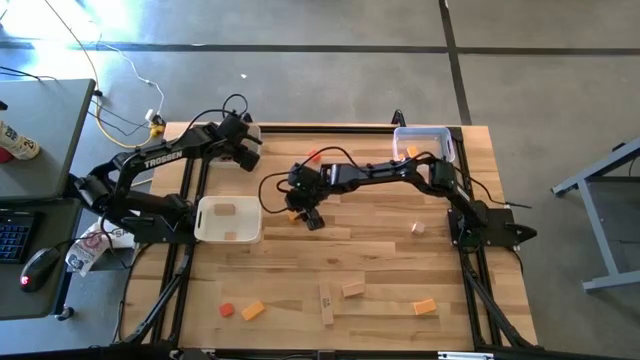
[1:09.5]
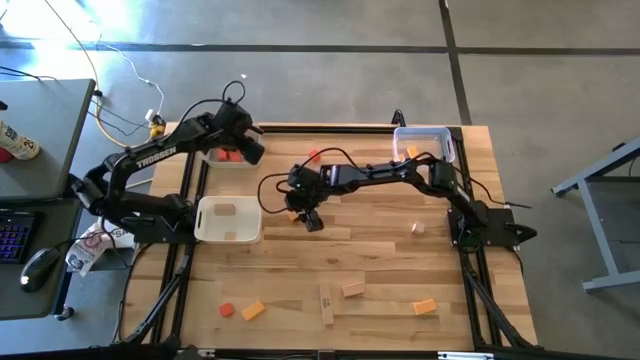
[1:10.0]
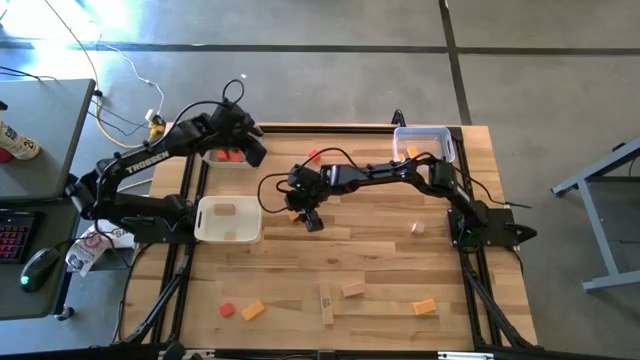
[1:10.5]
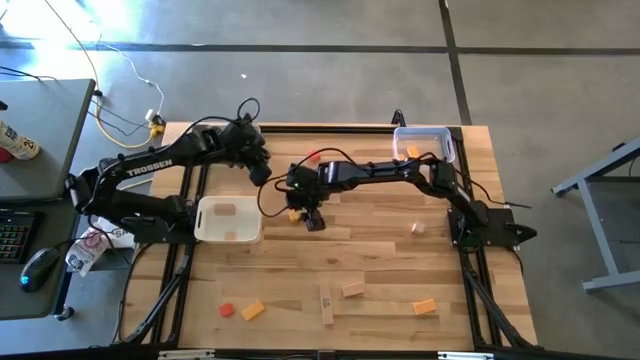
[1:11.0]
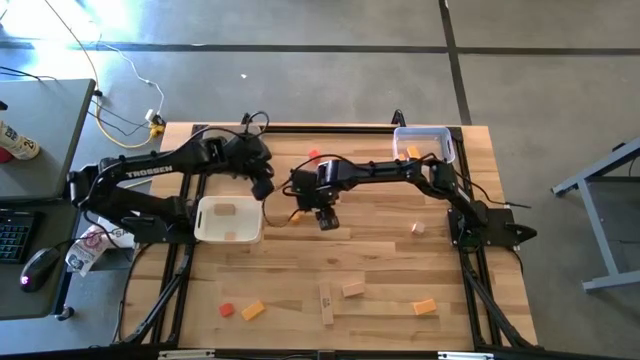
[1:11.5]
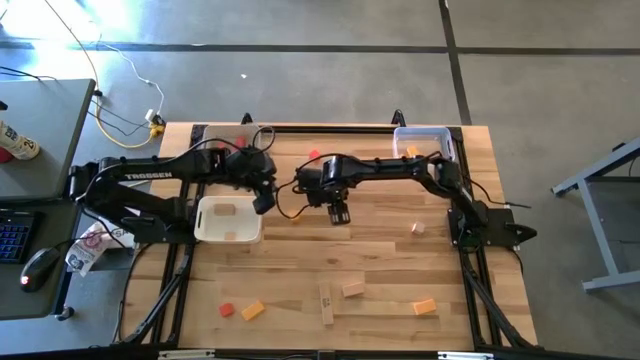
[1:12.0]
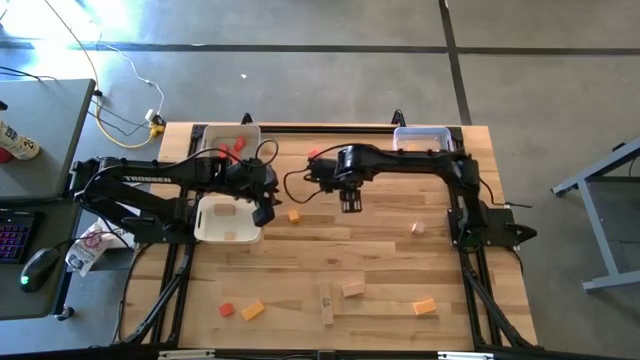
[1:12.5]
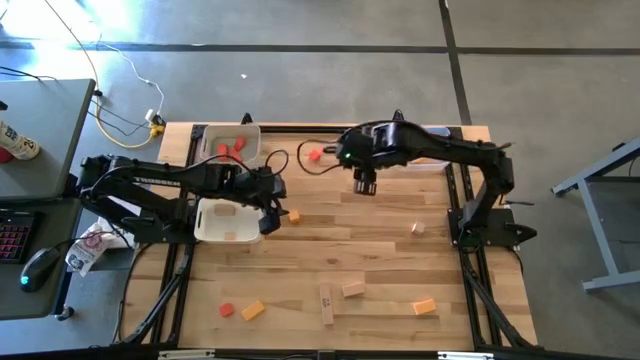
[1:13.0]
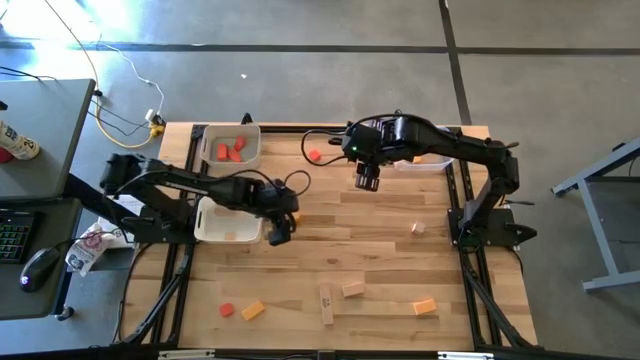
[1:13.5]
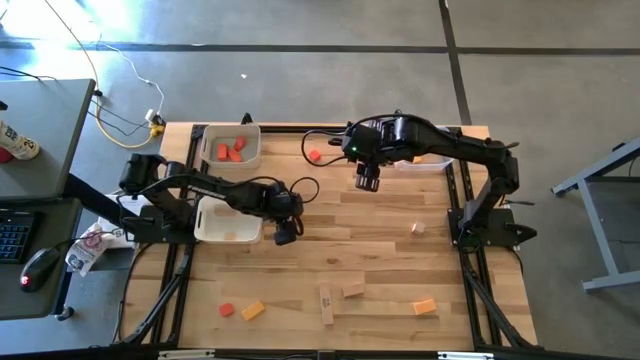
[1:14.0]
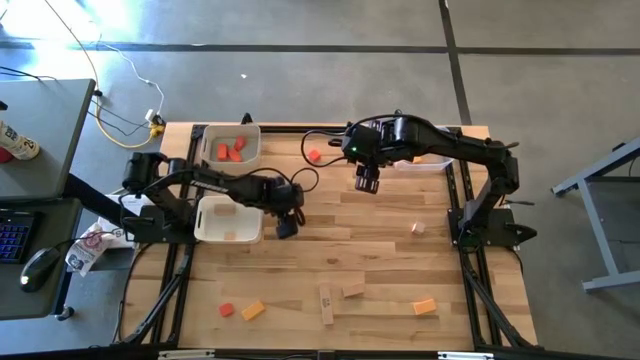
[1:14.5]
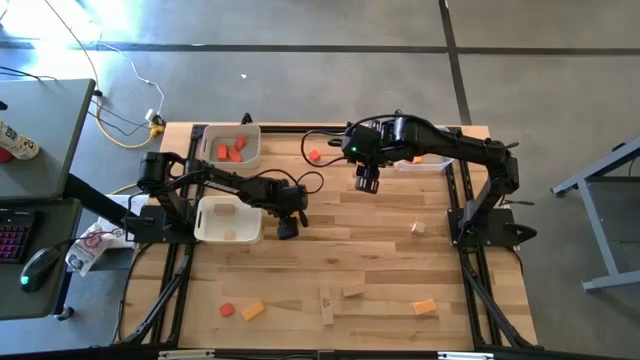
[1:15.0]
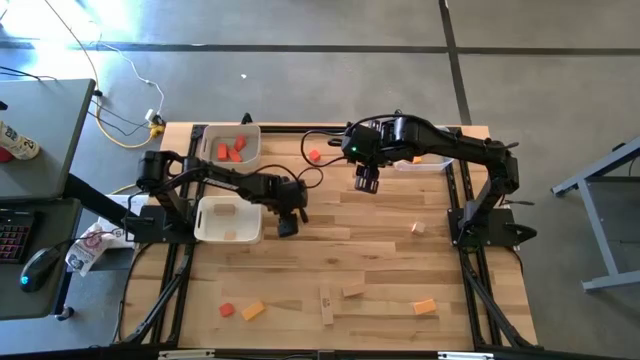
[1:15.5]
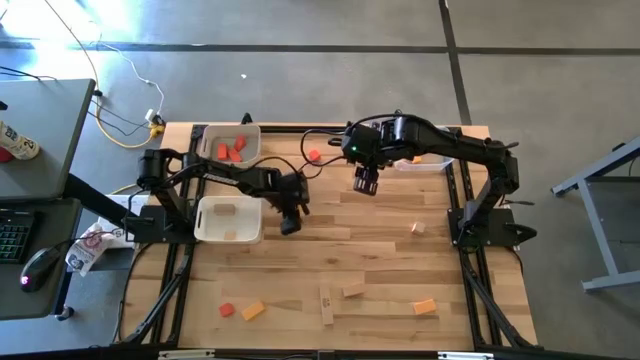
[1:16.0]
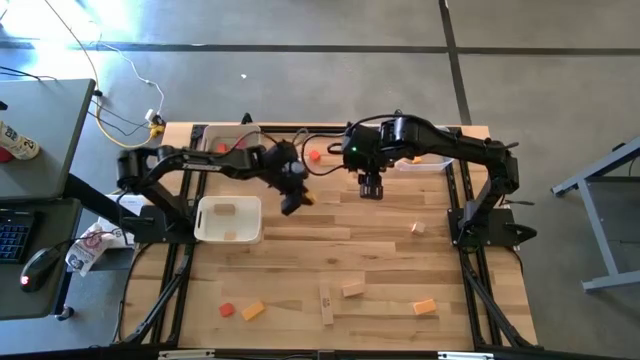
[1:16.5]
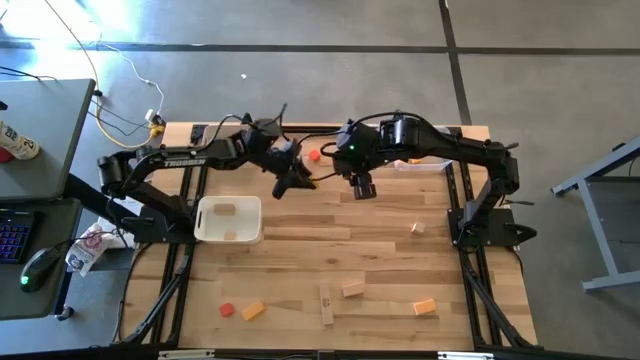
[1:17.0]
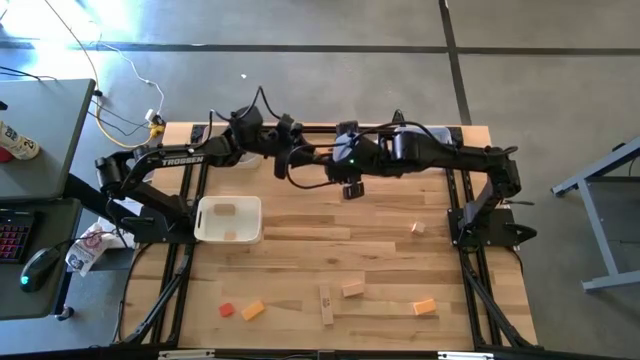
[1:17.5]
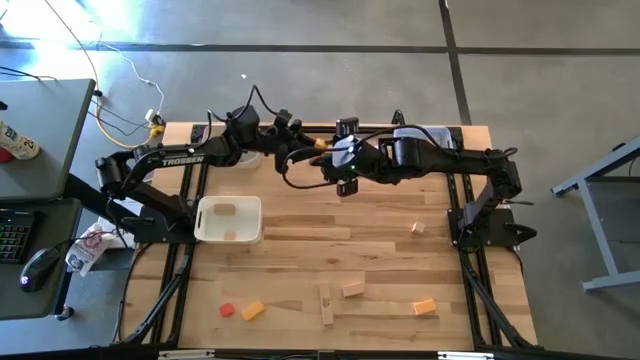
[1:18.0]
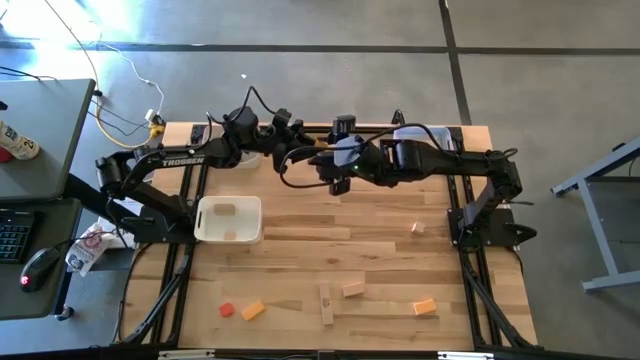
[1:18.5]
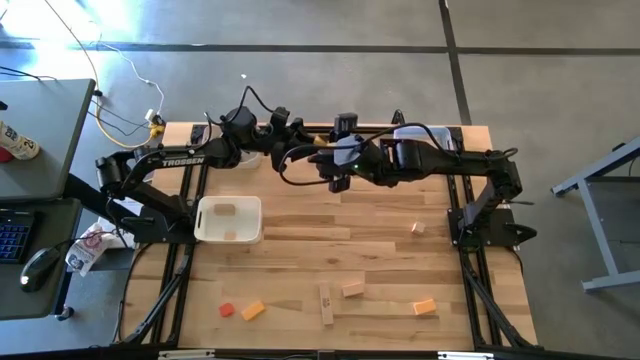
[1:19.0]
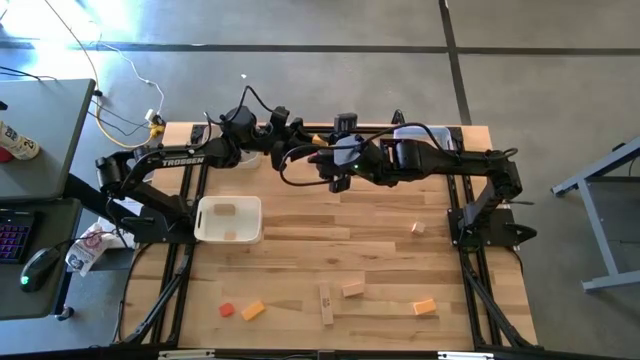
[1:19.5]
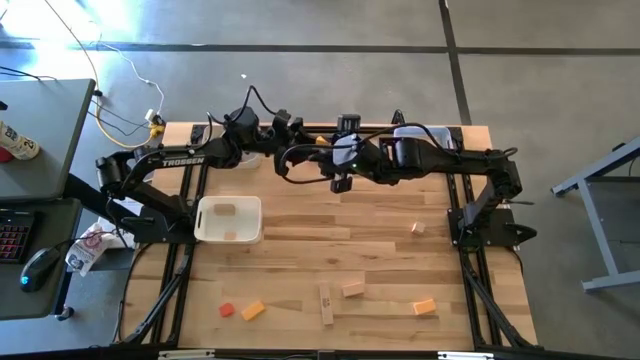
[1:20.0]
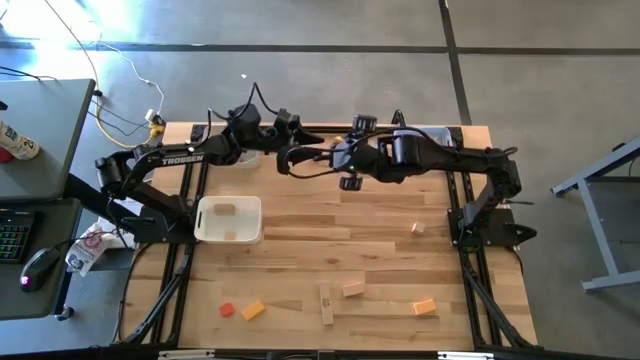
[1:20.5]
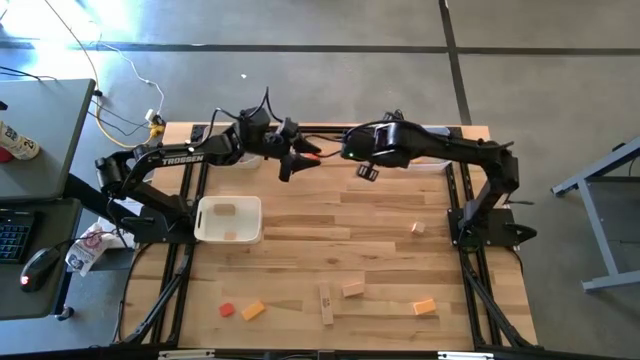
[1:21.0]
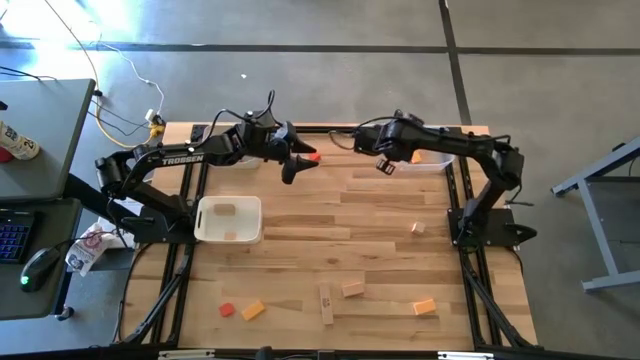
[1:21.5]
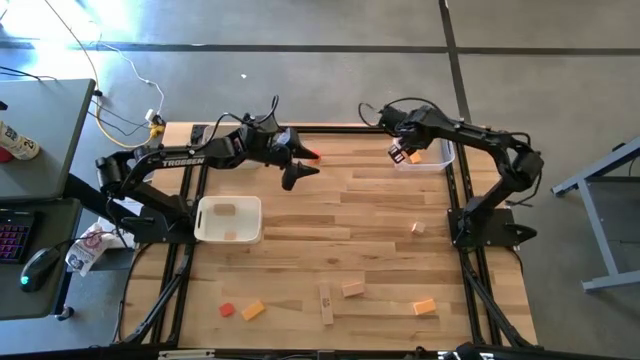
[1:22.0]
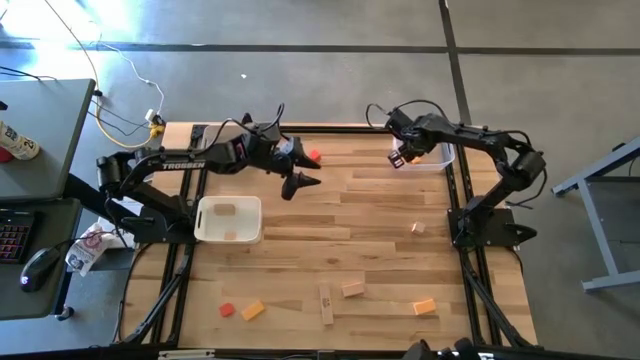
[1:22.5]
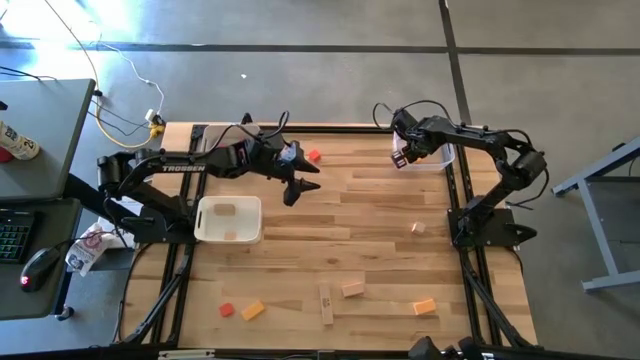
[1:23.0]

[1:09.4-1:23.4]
Task: Sort & place blocks by color
Put the yellow block into the transparent bin

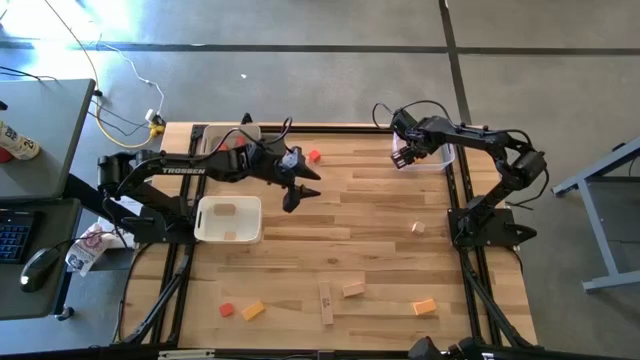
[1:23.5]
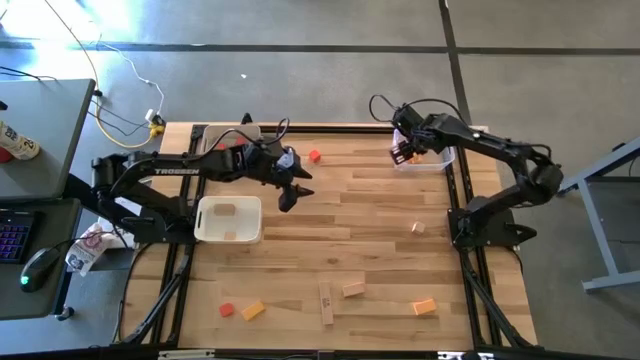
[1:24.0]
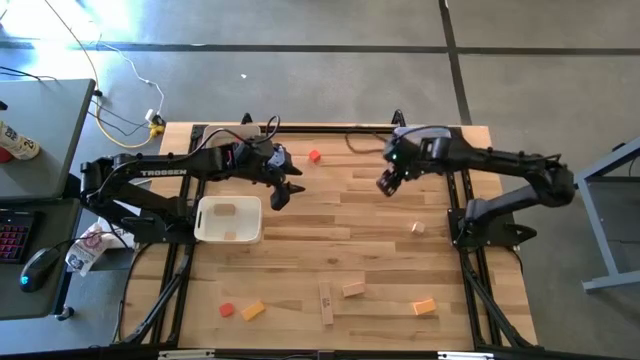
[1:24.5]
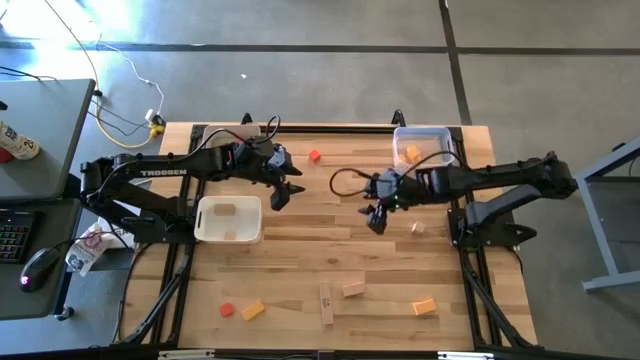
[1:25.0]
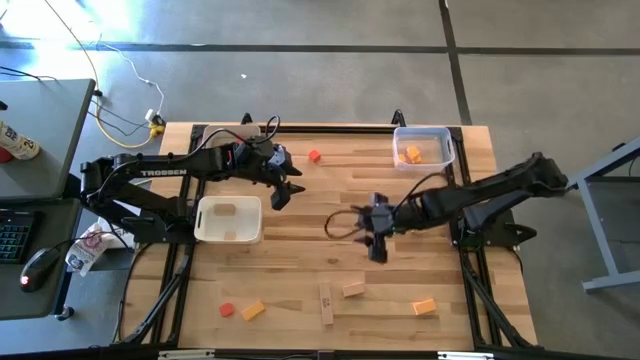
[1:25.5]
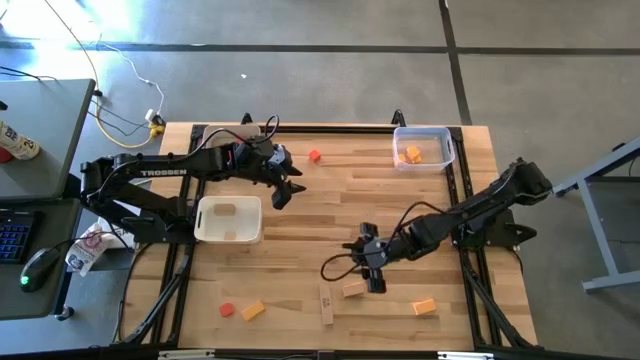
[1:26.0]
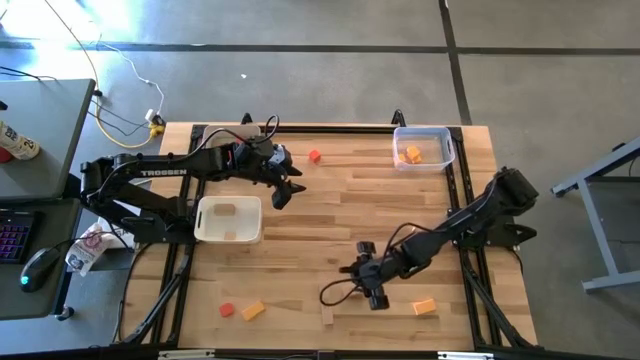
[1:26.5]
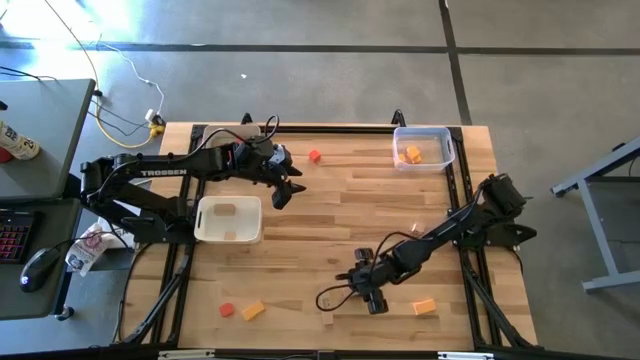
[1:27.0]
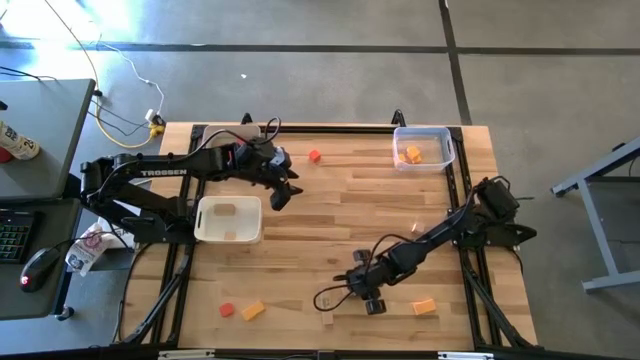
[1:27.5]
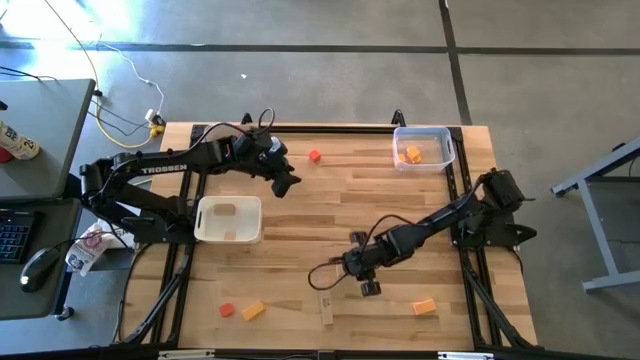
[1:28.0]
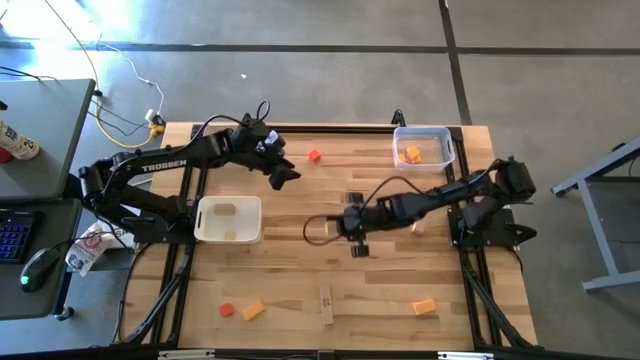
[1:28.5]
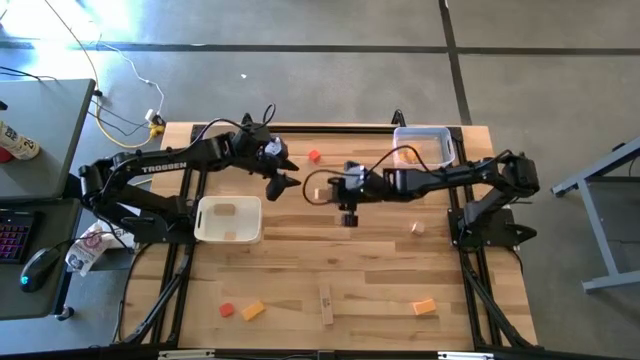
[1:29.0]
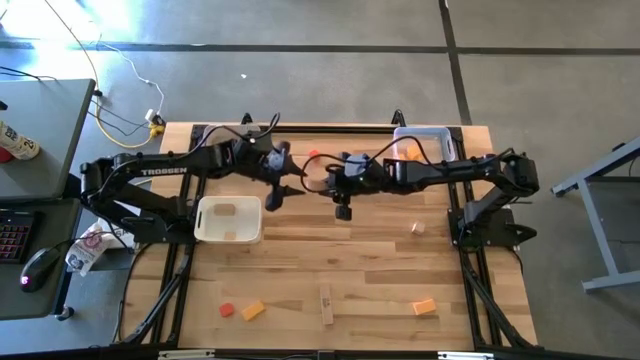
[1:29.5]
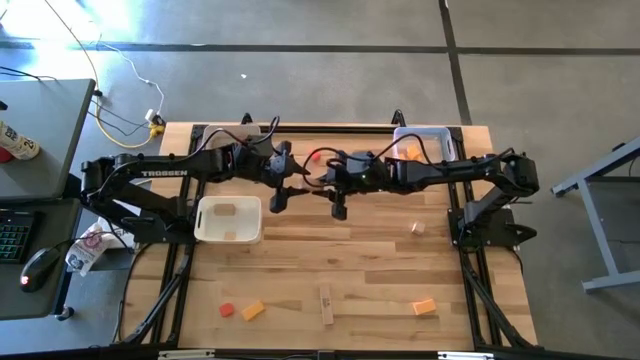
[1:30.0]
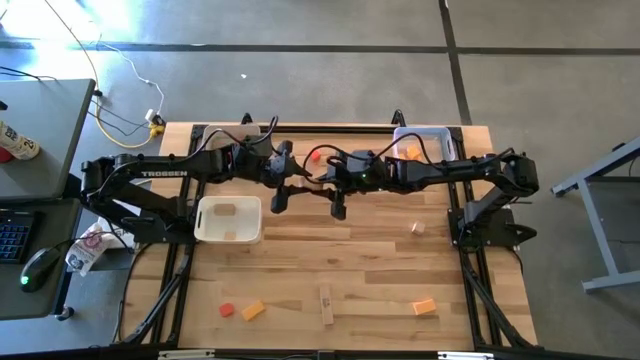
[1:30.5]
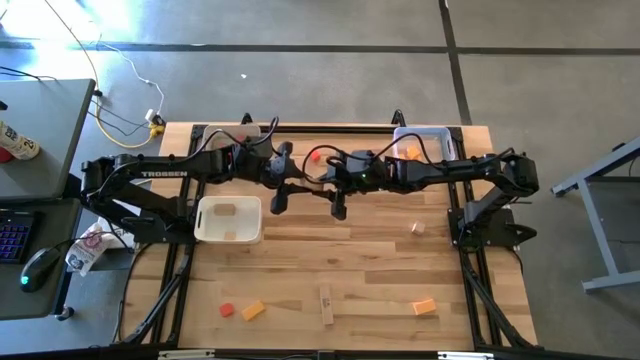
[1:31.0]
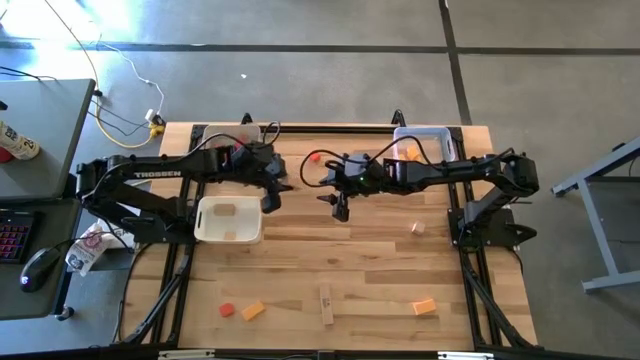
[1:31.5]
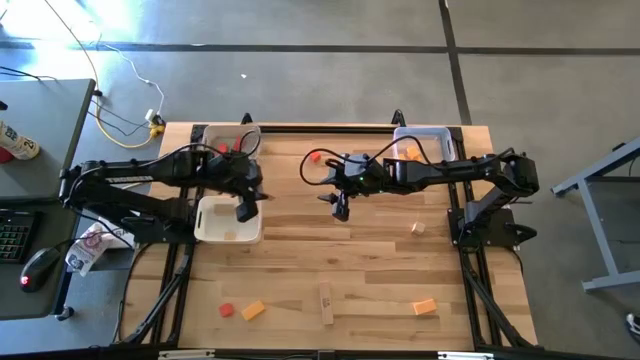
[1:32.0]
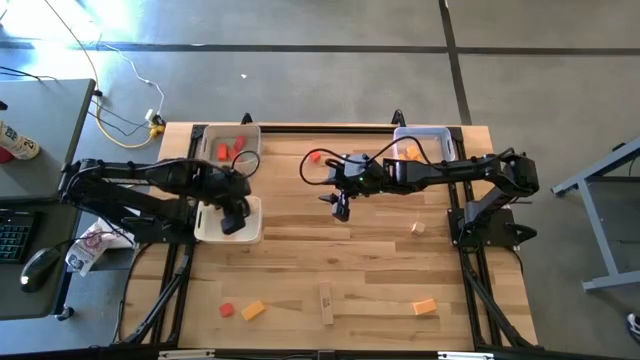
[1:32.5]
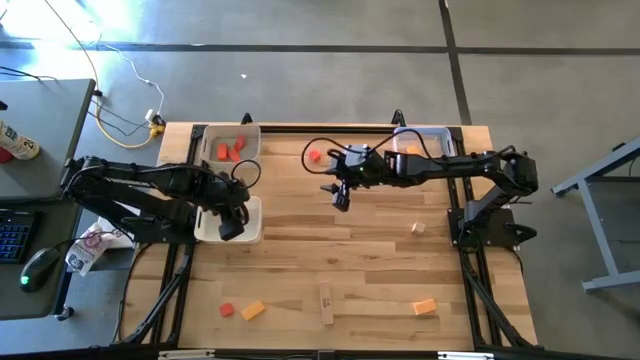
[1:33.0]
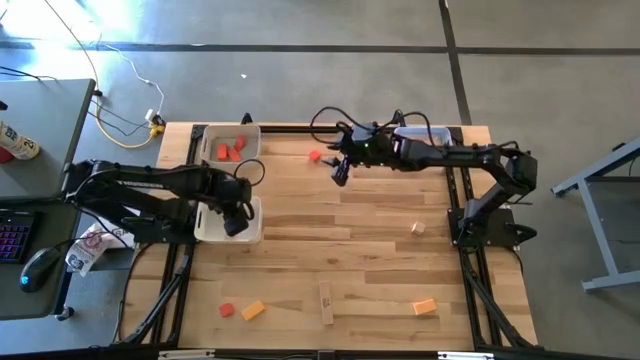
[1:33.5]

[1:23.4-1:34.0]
Put the brown block into the white bin
